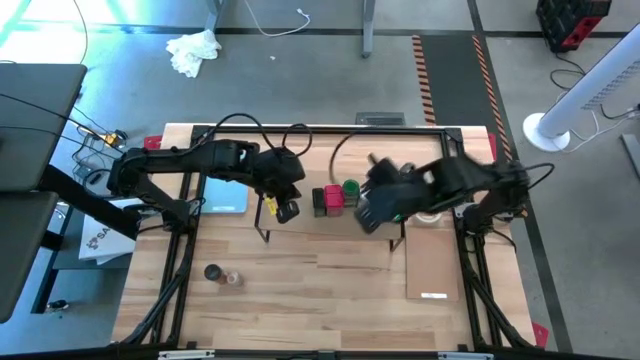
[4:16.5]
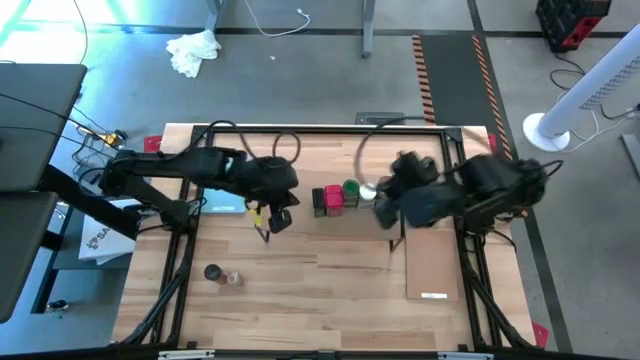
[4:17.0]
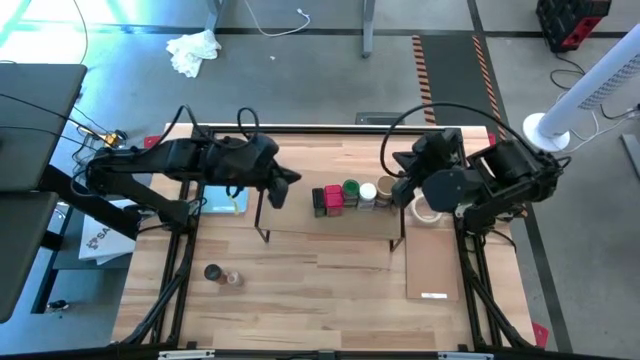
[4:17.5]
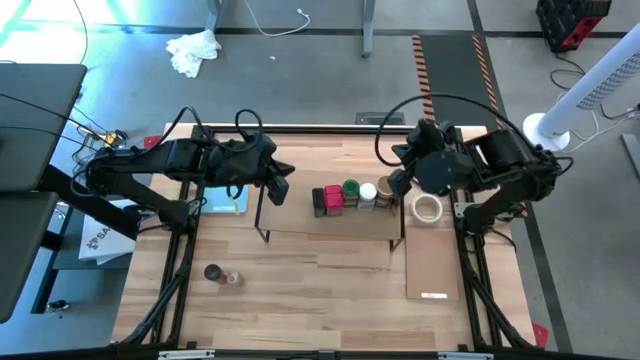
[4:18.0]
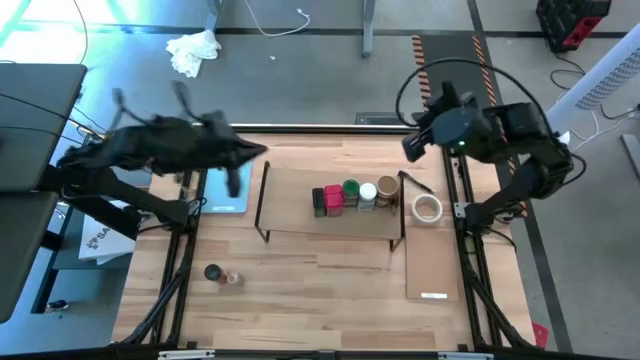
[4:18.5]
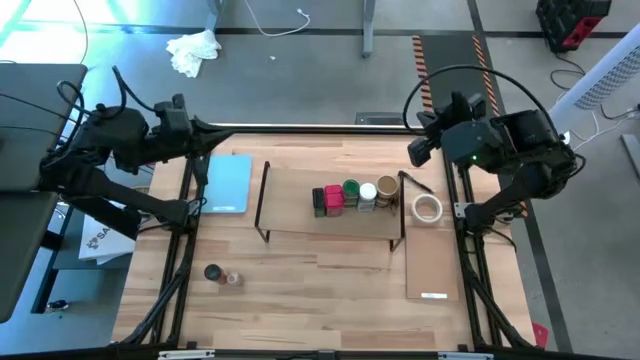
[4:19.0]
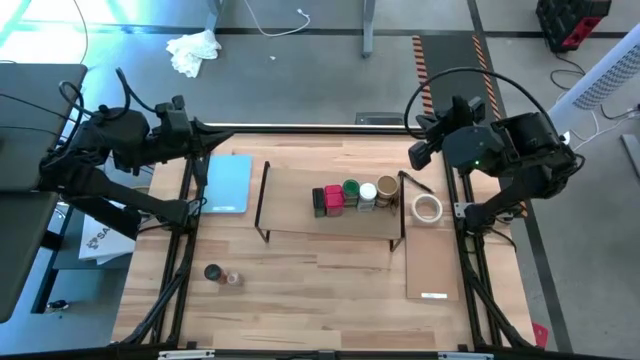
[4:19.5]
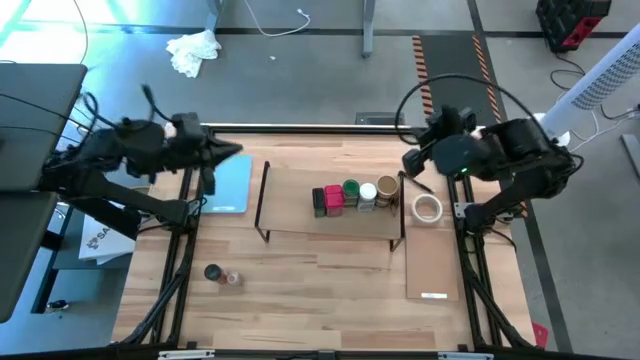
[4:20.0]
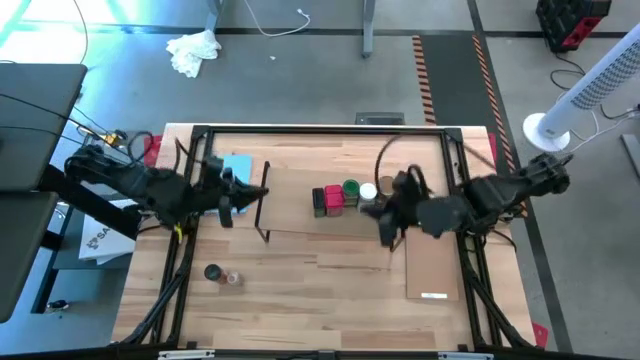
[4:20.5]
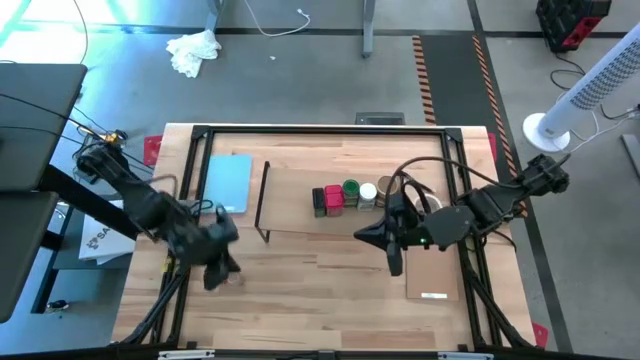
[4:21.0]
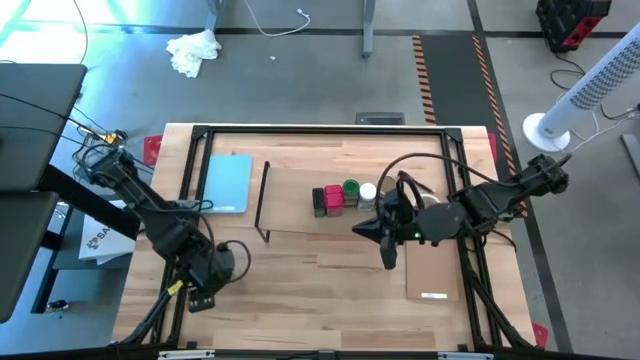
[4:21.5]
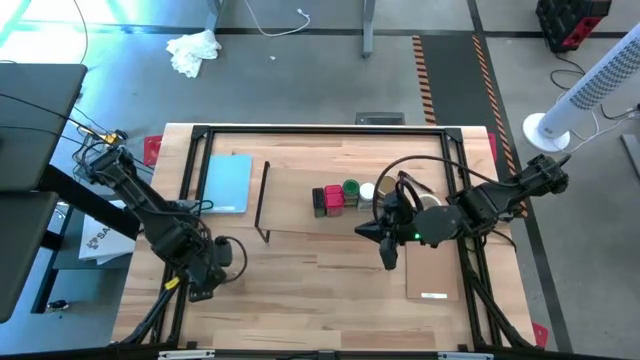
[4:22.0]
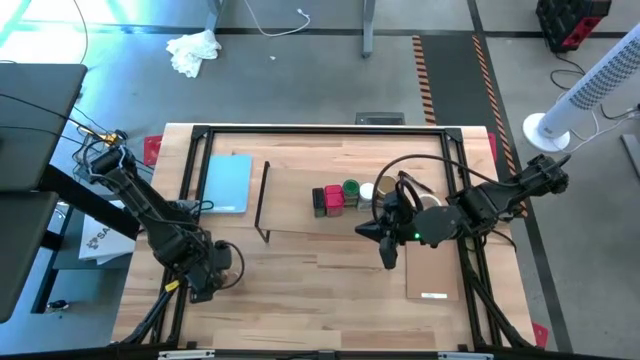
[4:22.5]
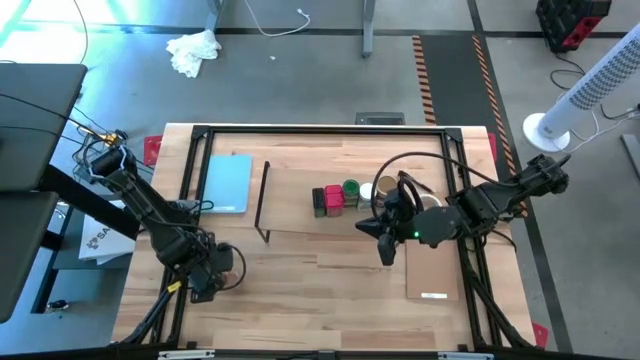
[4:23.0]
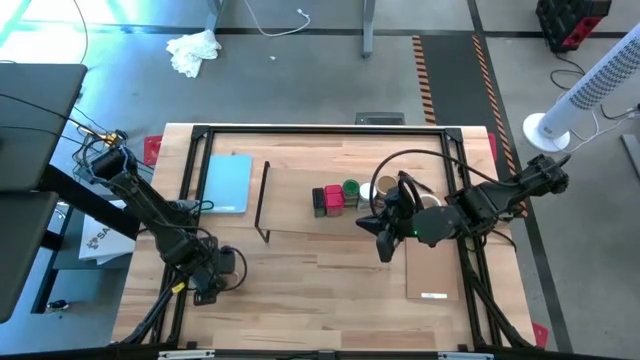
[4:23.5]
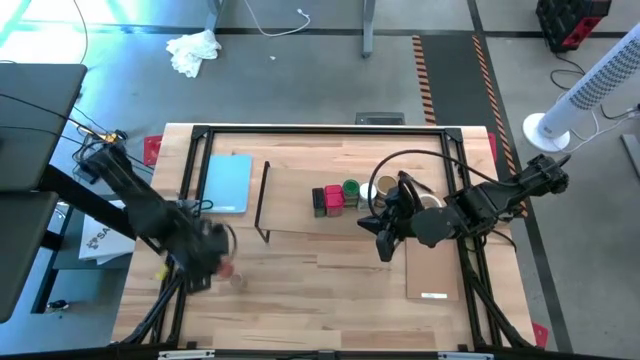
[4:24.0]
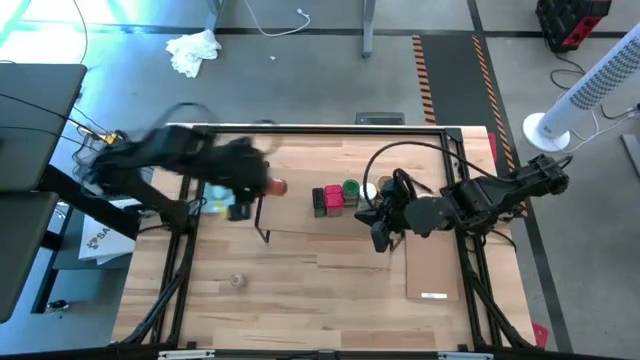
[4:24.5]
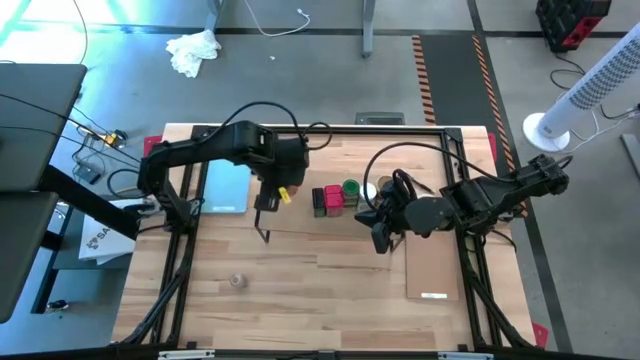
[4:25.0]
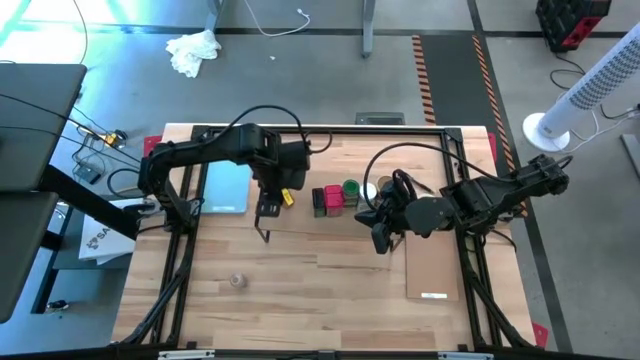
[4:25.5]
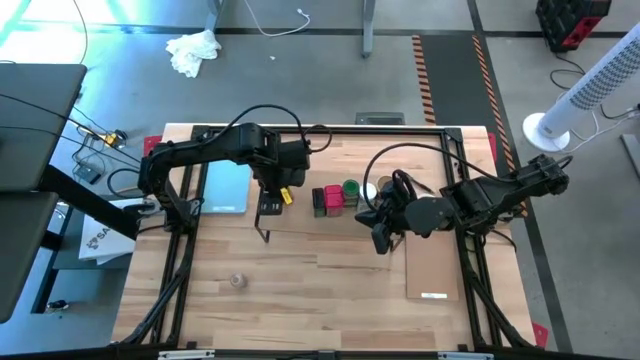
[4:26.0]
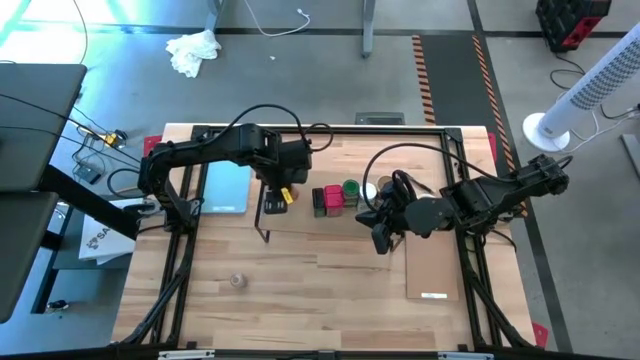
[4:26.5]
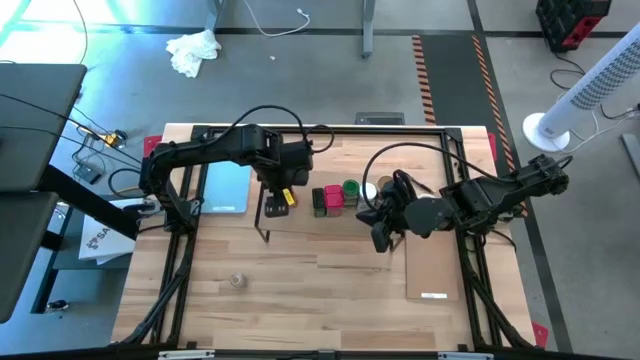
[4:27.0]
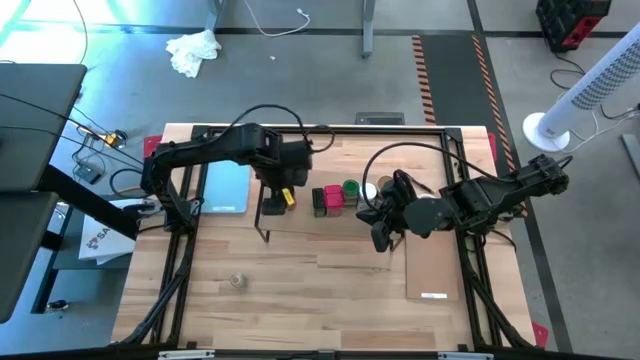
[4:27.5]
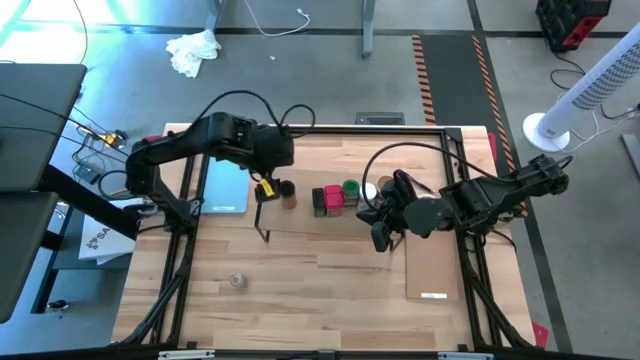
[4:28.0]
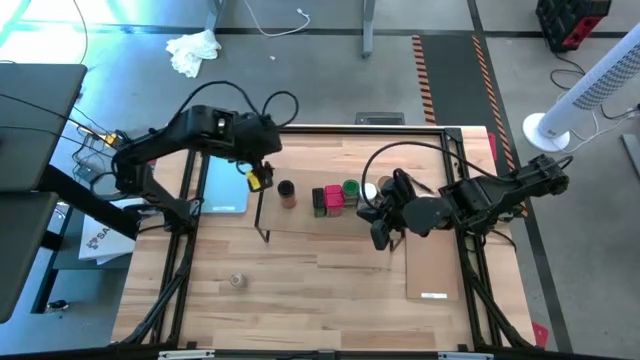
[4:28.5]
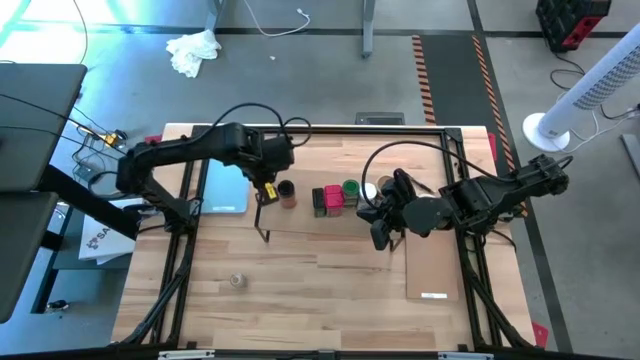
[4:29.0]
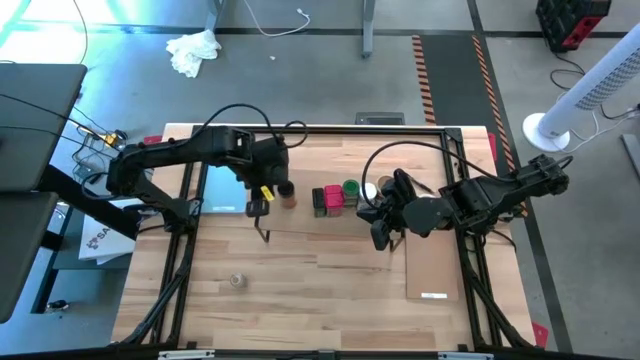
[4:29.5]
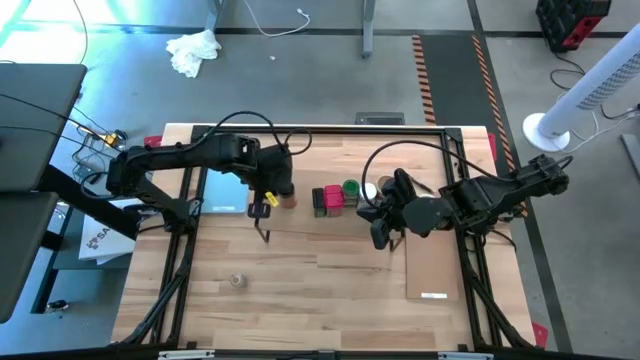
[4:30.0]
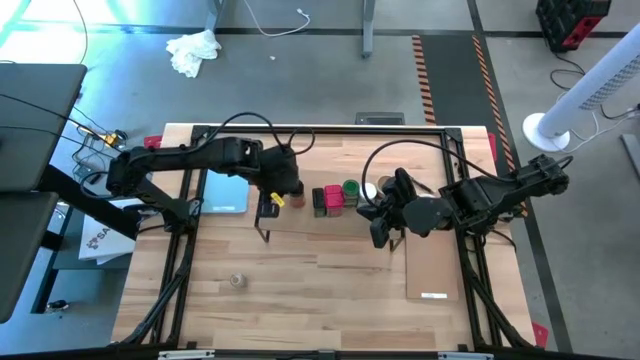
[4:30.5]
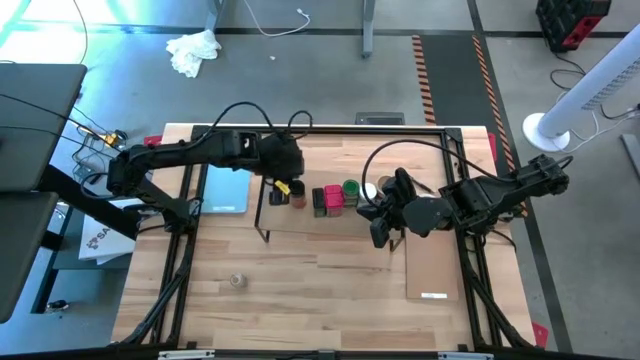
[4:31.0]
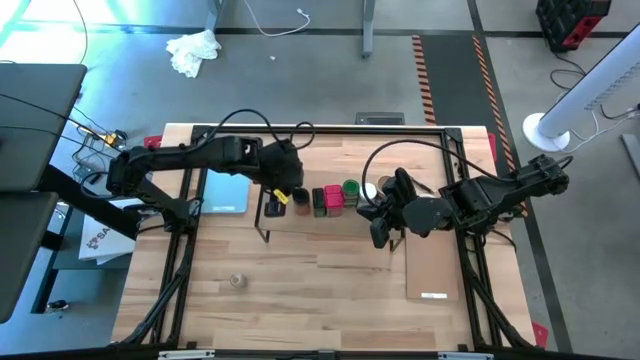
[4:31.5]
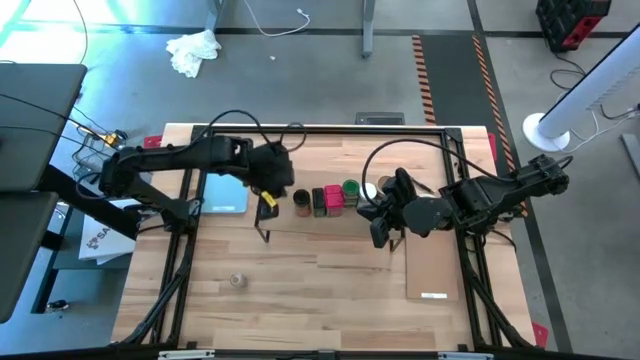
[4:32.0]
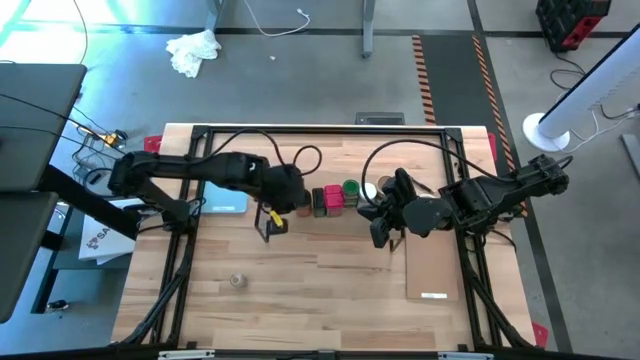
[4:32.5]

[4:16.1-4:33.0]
Task: Shelf spices
Put the black seasoning bottle on the shelf

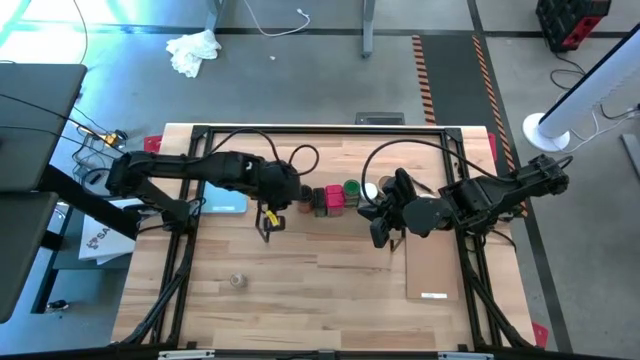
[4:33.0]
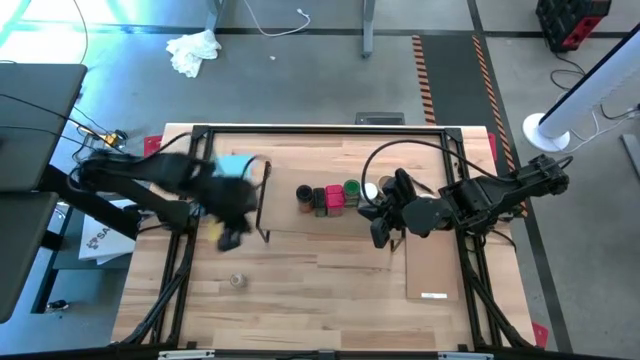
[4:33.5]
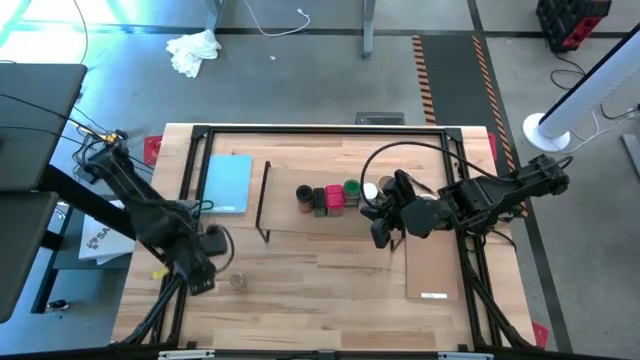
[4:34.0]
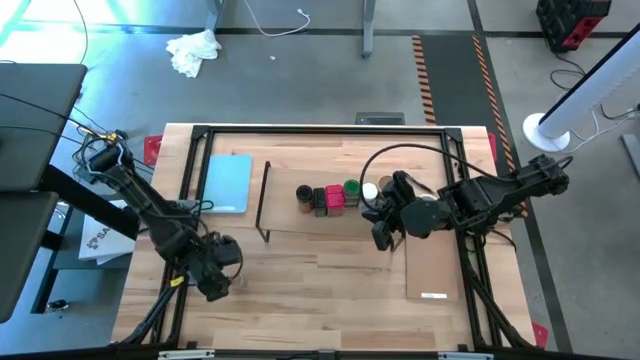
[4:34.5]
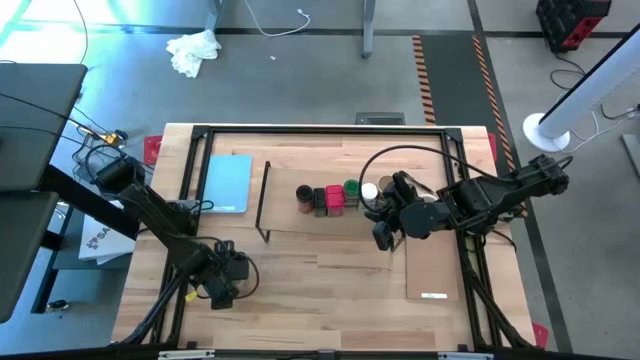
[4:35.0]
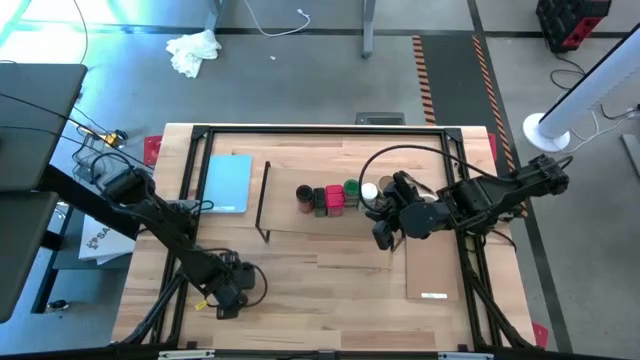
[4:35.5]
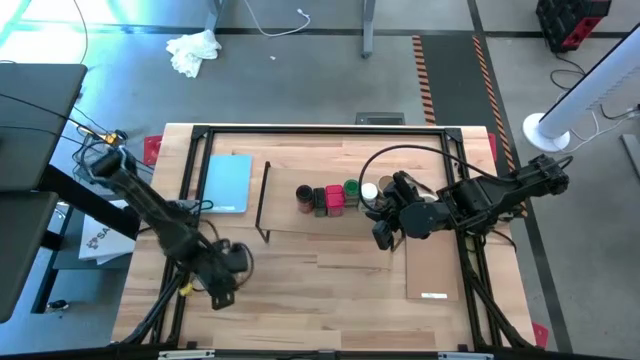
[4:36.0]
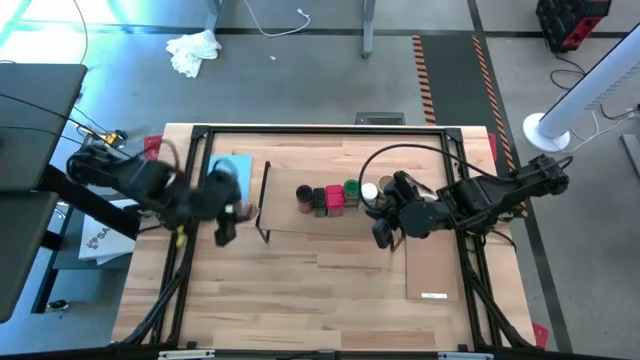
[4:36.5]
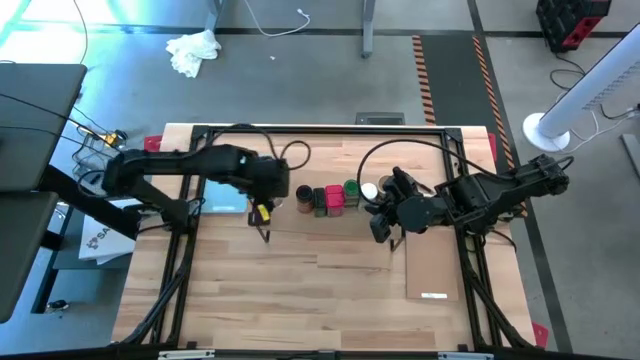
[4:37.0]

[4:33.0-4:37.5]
Put the transparent seasoning on the shelf
